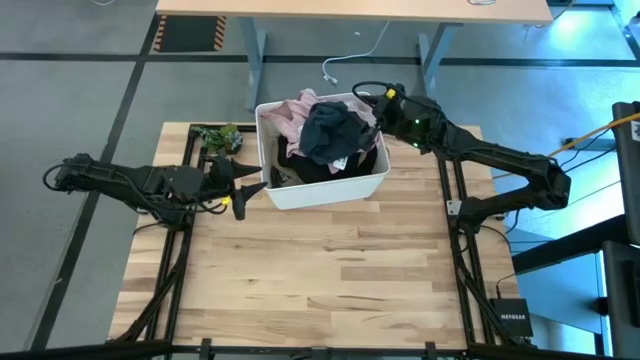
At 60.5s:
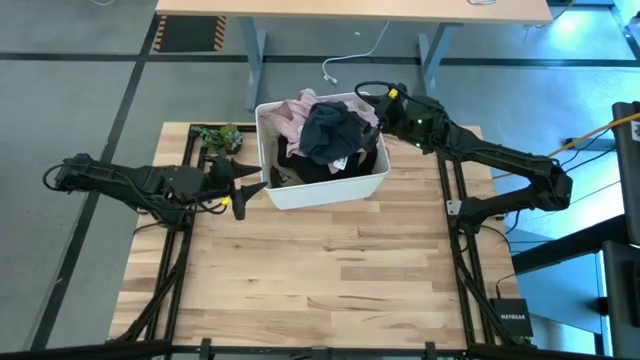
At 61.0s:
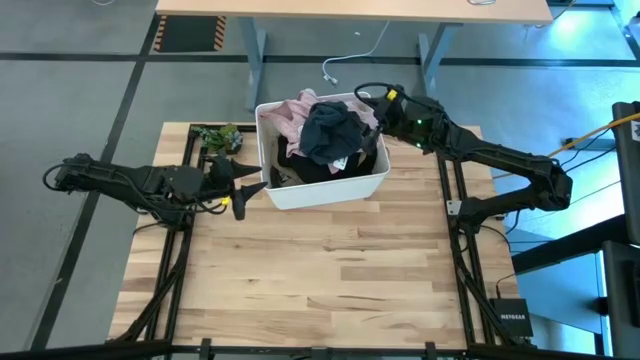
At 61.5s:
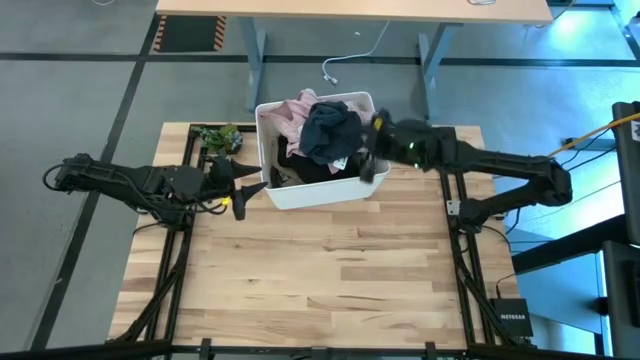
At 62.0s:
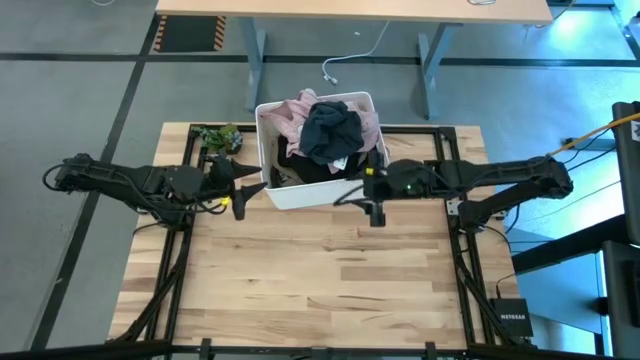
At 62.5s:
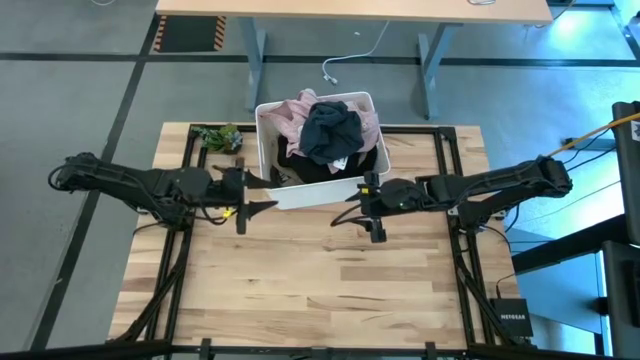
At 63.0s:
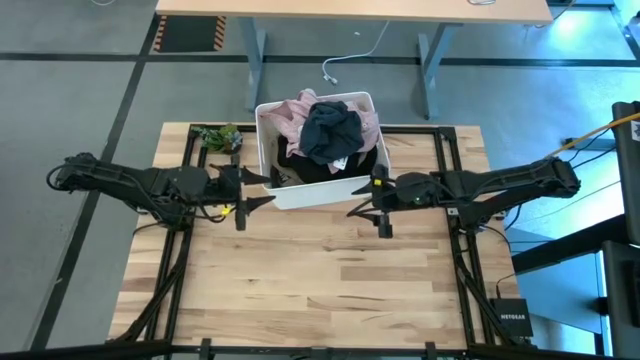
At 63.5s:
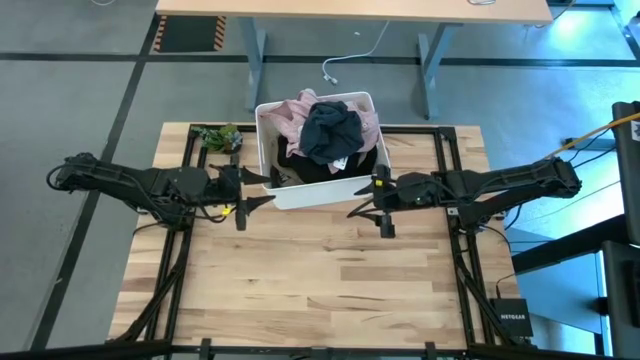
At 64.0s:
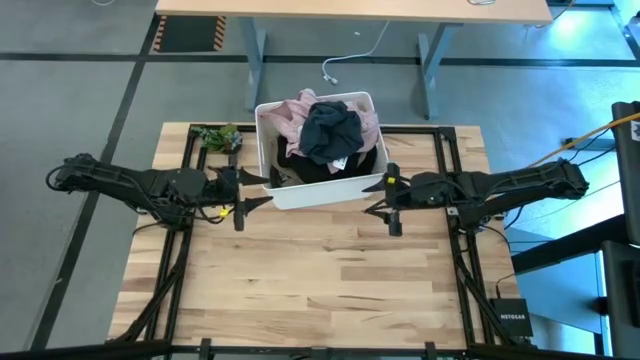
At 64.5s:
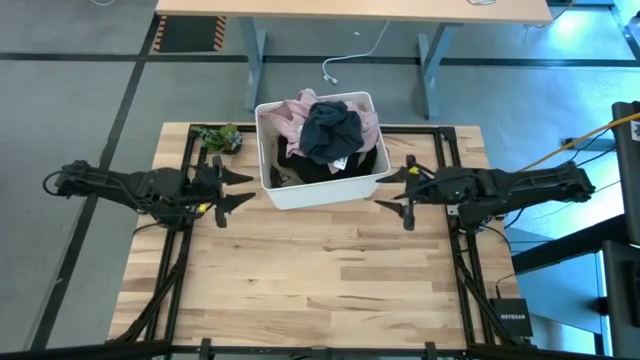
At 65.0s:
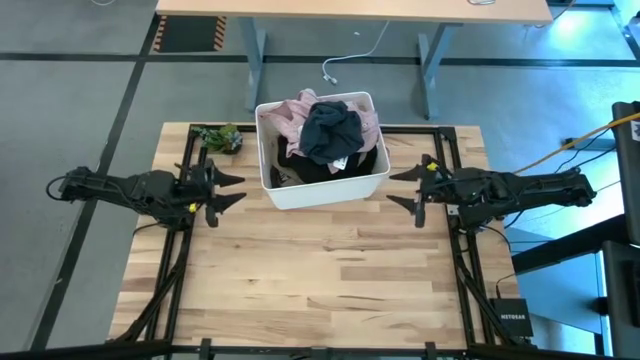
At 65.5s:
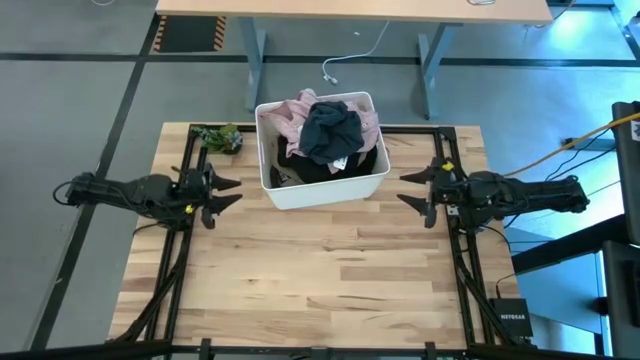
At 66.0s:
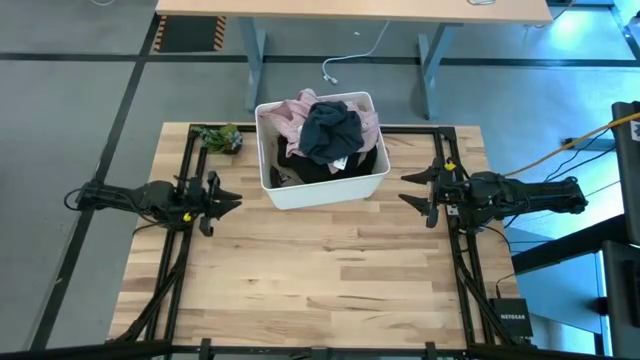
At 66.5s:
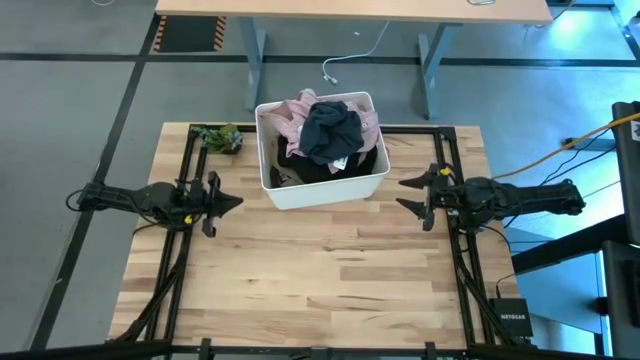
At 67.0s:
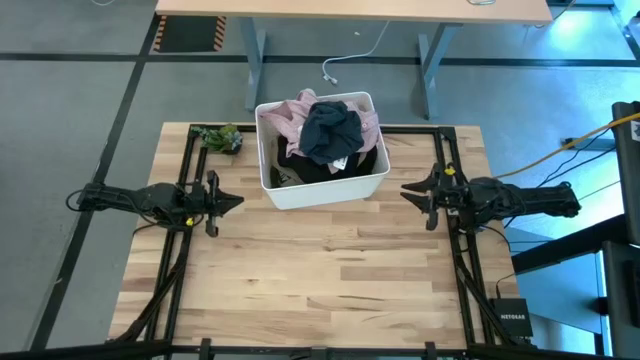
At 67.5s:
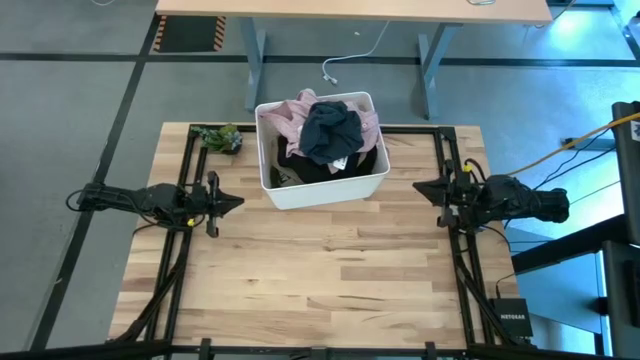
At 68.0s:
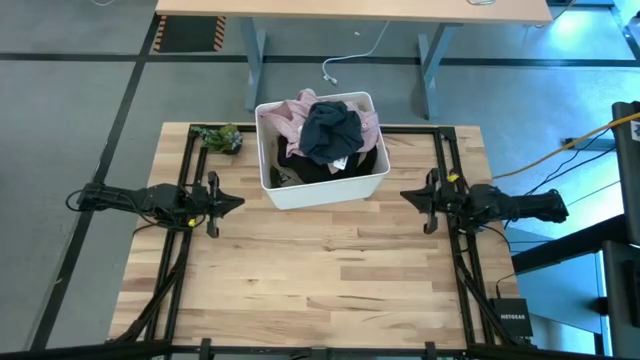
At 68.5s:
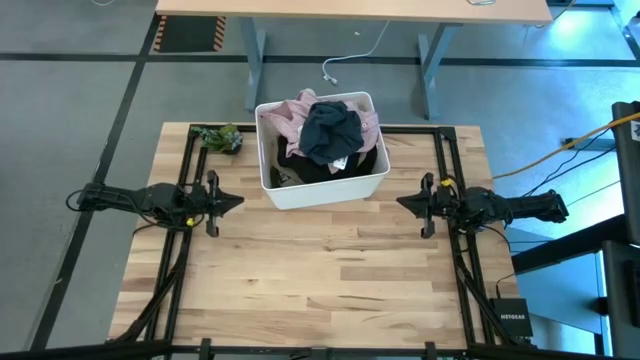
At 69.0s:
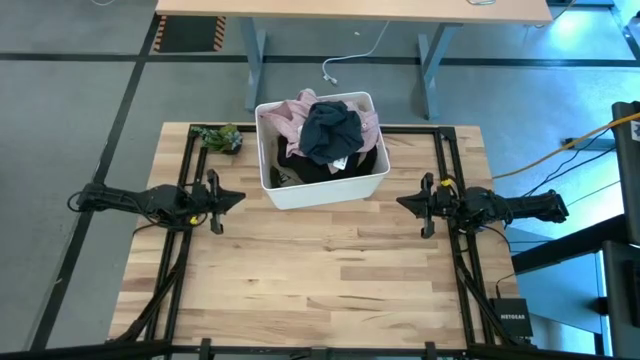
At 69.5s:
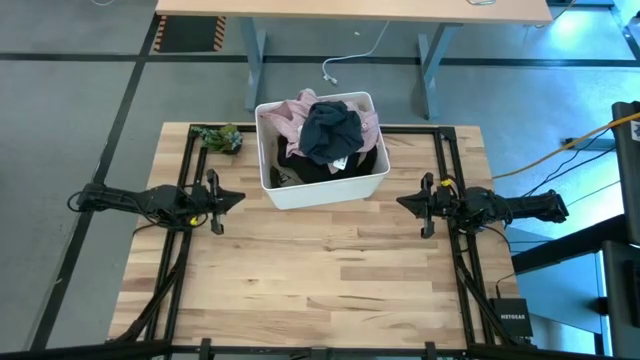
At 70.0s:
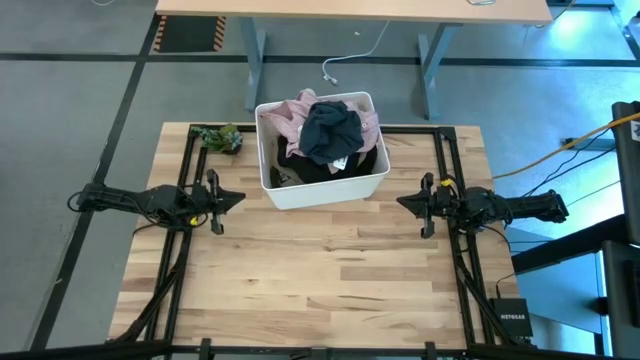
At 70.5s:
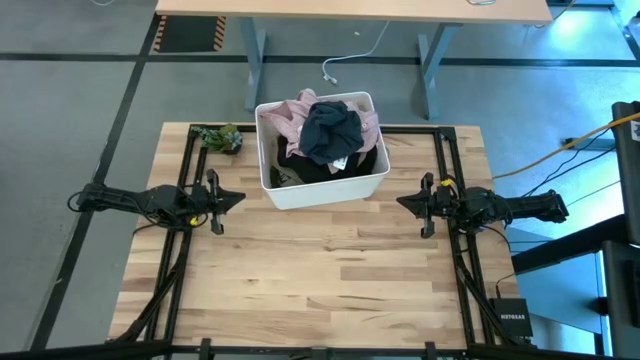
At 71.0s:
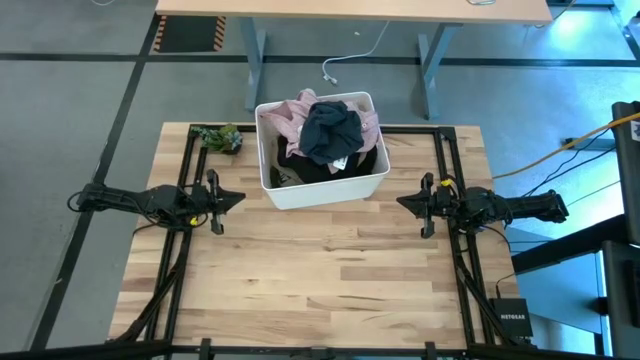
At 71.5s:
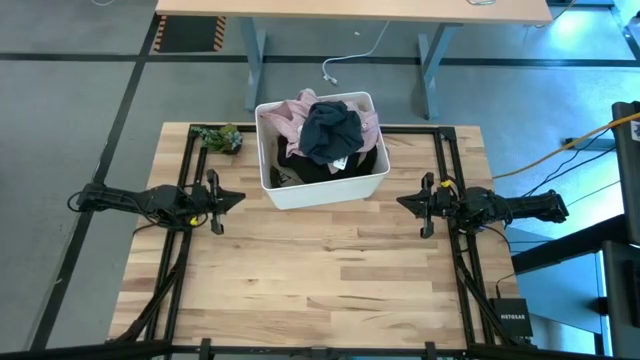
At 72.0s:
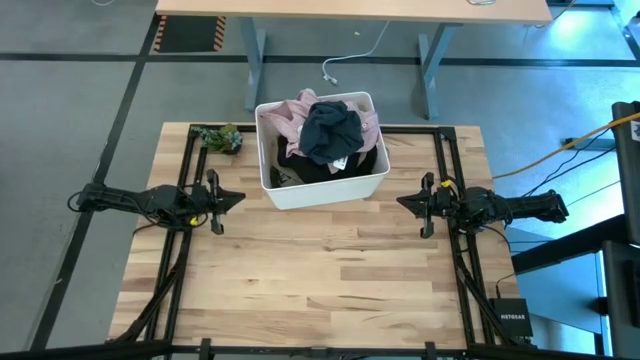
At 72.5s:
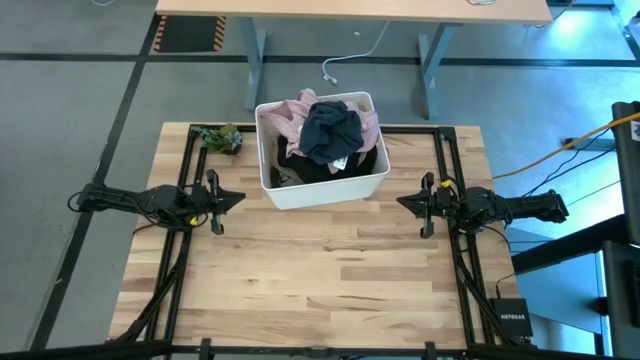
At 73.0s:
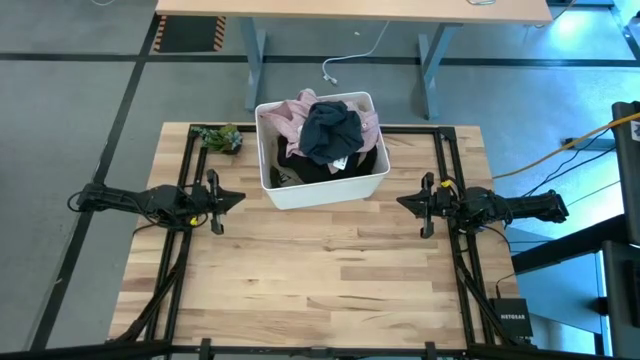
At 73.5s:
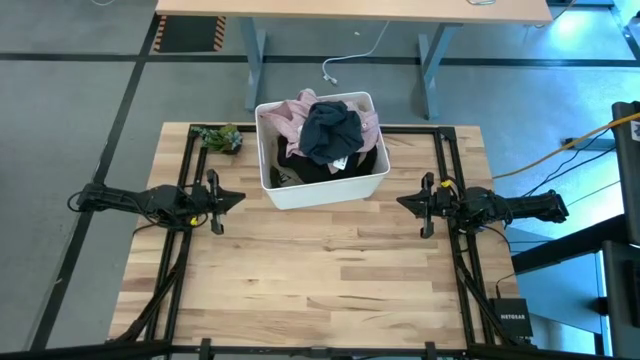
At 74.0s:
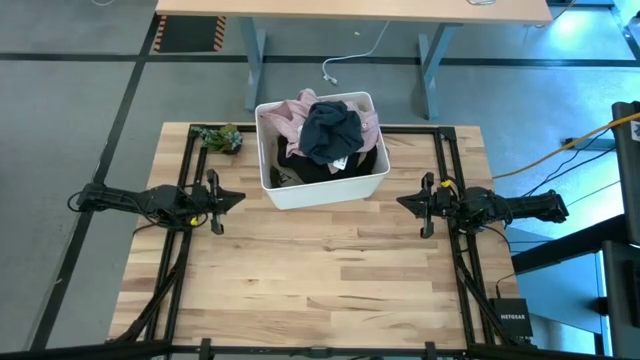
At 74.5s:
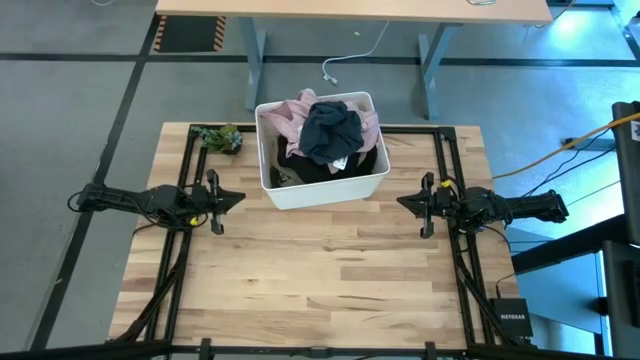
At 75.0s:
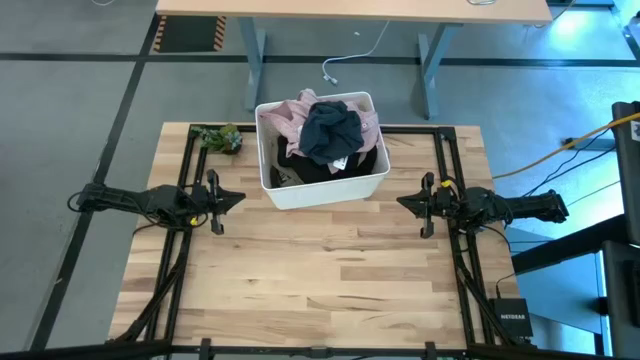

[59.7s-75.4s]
Task: Sort clothes
Return to Home Position

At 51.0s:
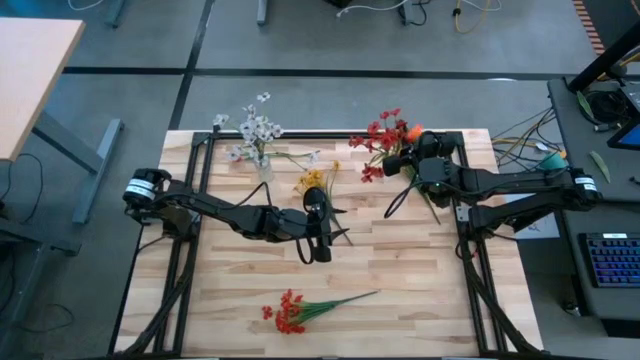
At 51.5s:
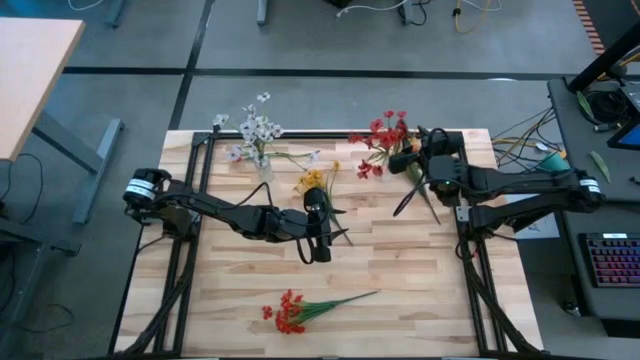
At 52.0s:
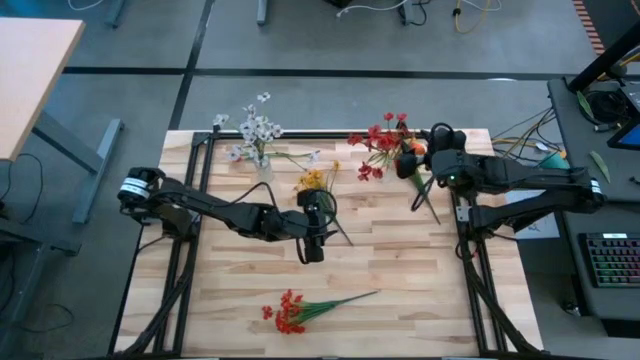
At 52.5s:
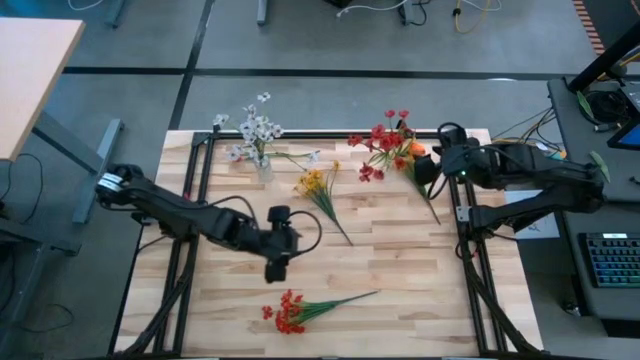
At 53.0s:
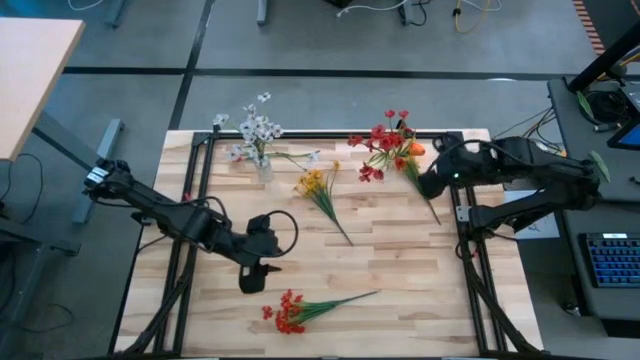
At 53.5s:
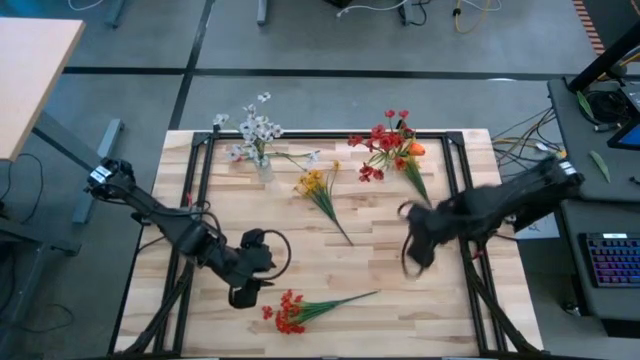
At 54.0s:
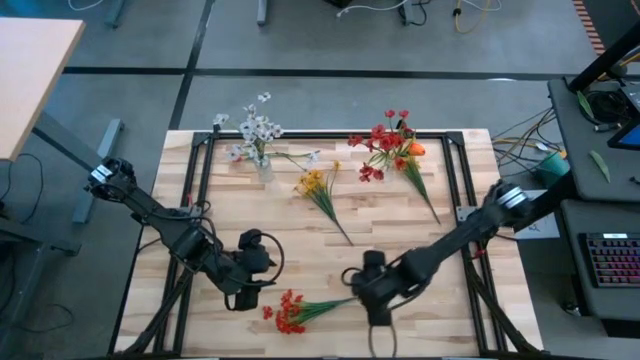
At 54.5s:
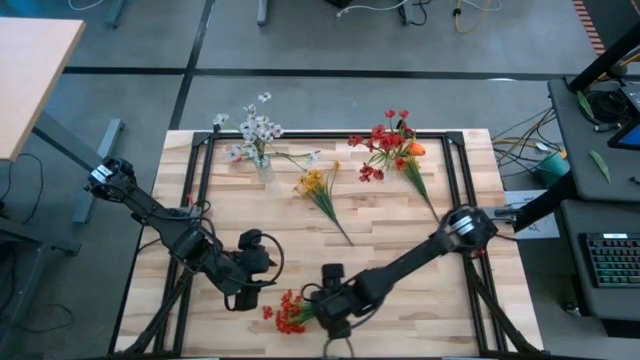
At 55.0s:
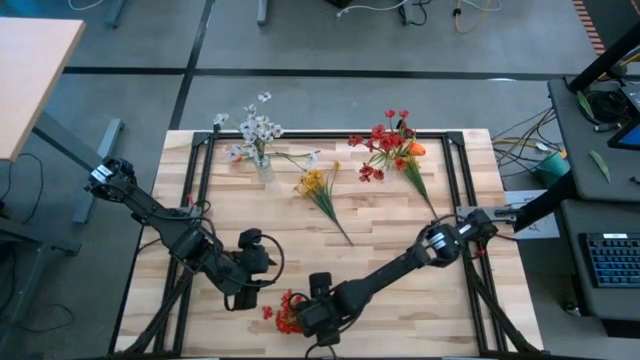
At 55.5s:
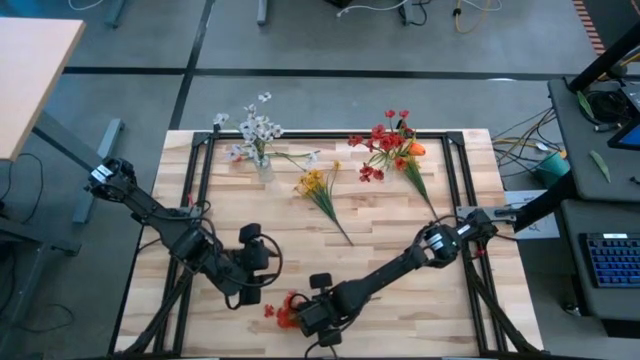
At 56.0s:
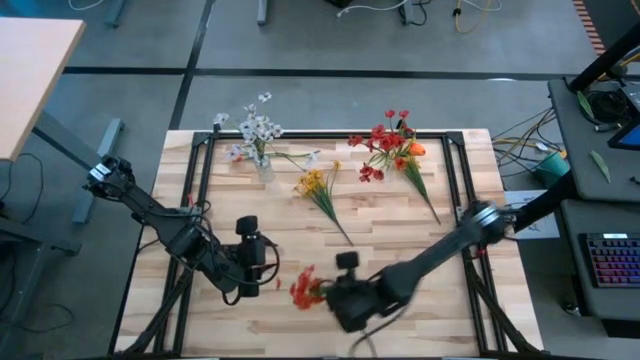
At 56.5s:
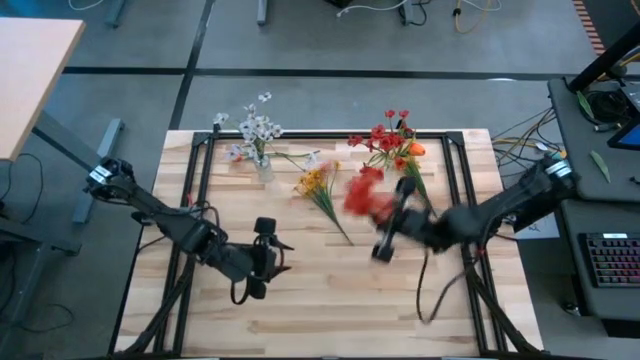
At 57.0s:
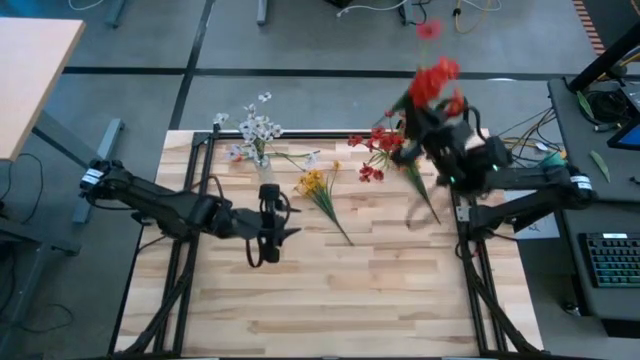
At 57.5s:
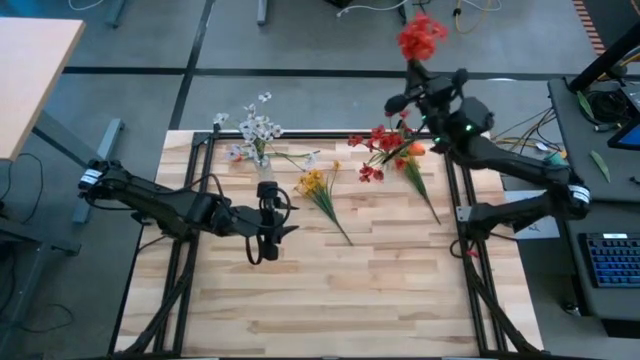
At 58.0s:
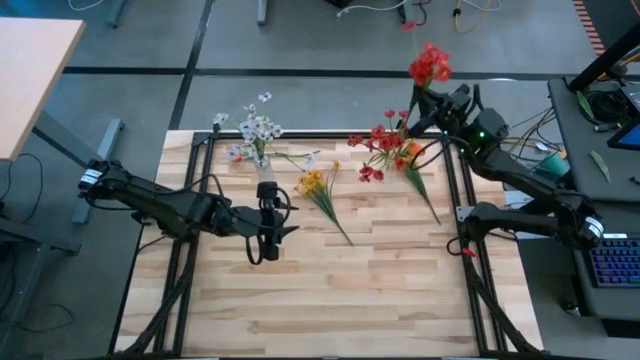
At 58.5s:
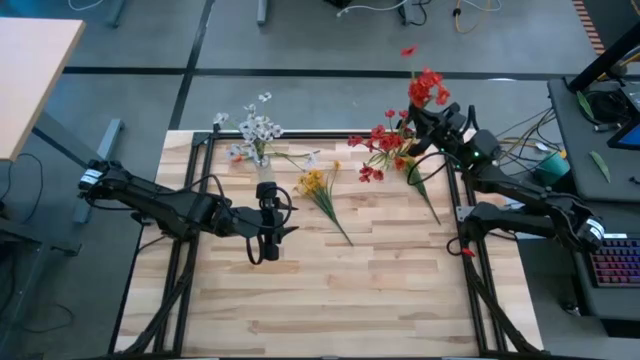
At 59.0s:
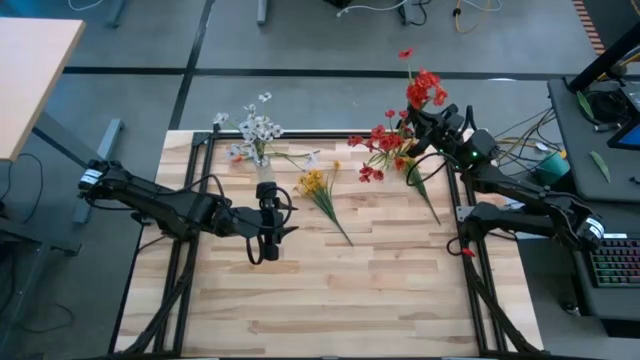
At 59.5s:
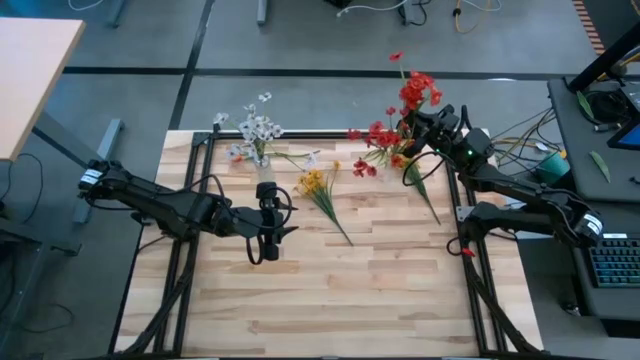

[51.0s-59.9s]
Task: Sort flowers into vase by color
Put the red flowers into the right transparent flower vase
